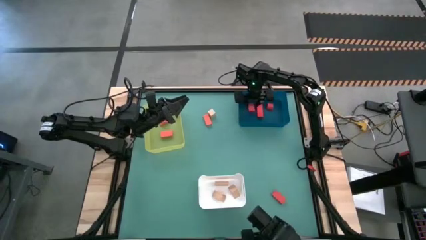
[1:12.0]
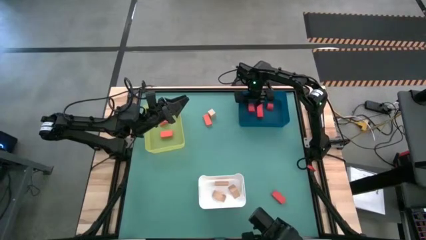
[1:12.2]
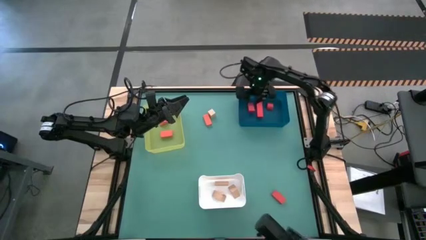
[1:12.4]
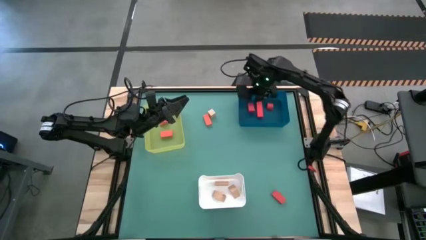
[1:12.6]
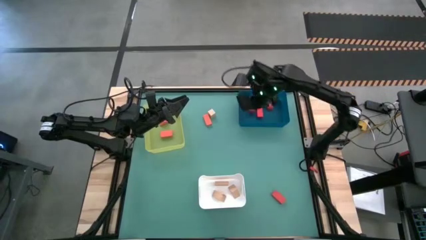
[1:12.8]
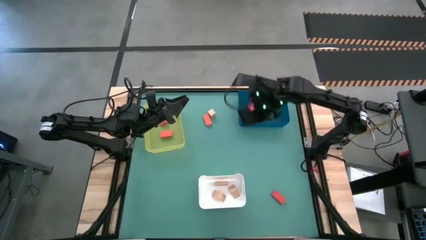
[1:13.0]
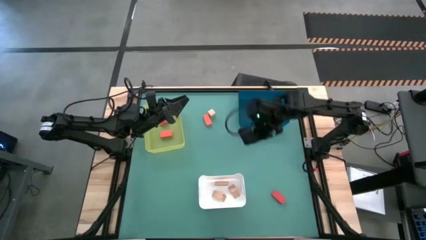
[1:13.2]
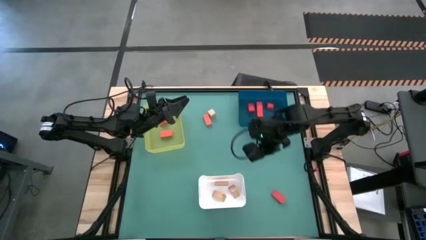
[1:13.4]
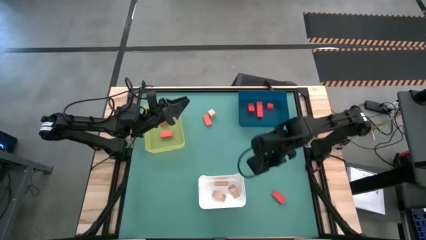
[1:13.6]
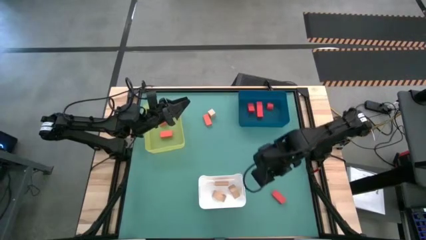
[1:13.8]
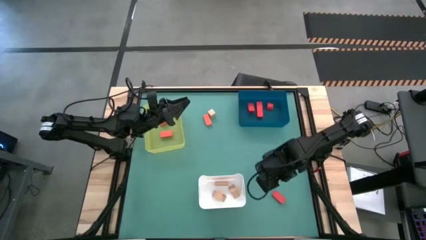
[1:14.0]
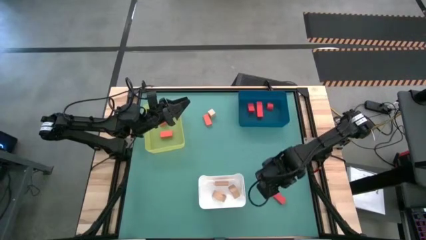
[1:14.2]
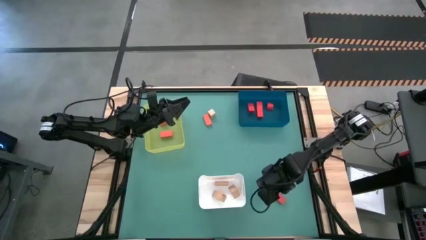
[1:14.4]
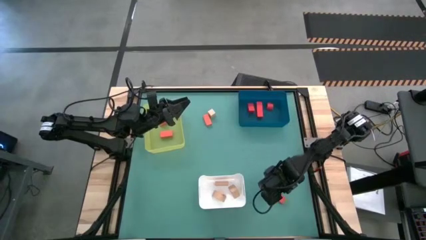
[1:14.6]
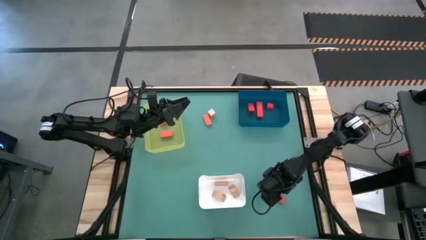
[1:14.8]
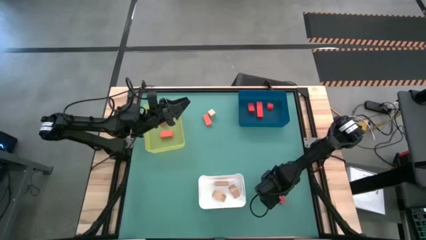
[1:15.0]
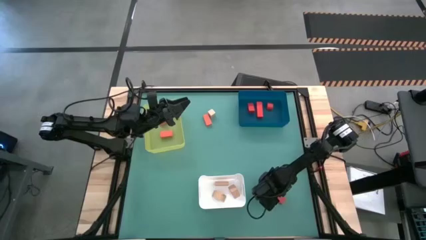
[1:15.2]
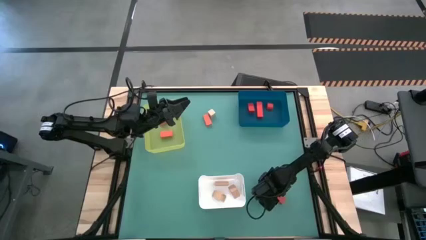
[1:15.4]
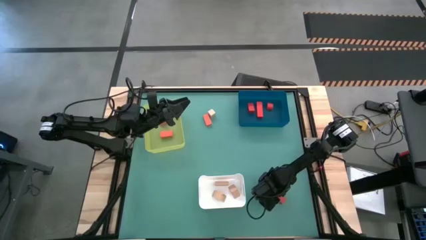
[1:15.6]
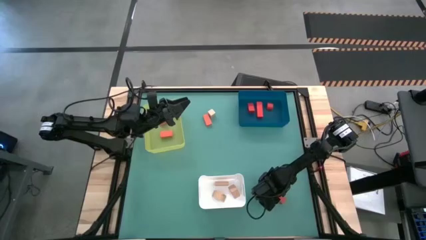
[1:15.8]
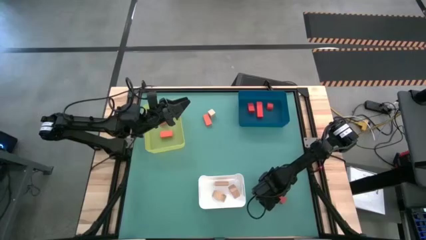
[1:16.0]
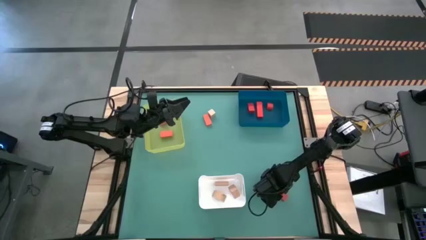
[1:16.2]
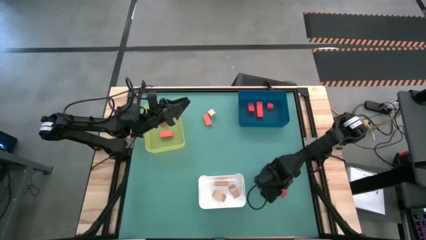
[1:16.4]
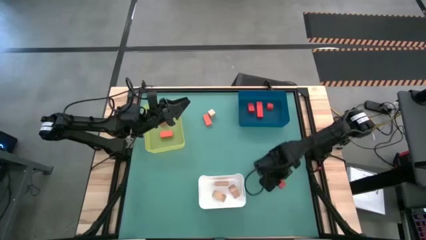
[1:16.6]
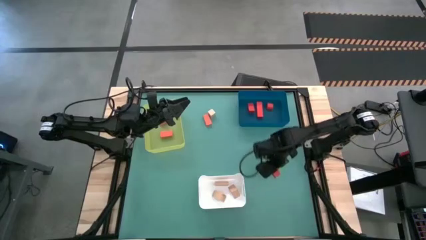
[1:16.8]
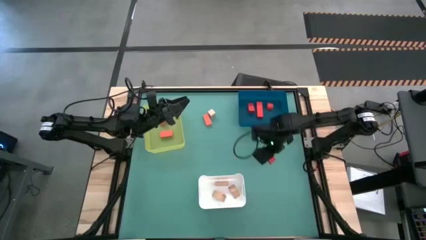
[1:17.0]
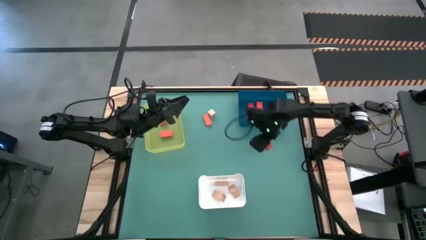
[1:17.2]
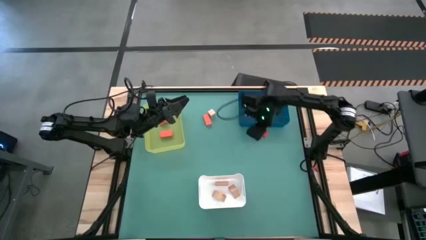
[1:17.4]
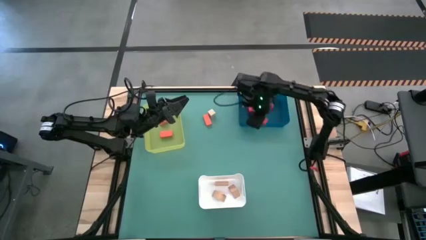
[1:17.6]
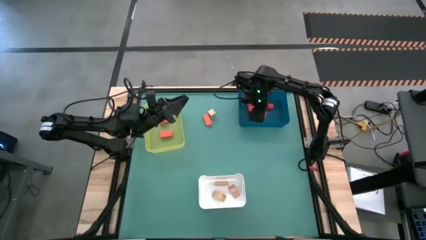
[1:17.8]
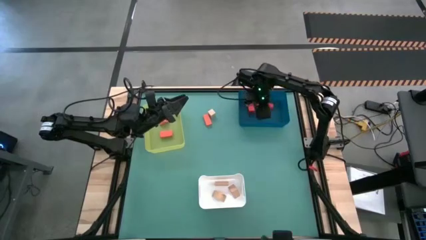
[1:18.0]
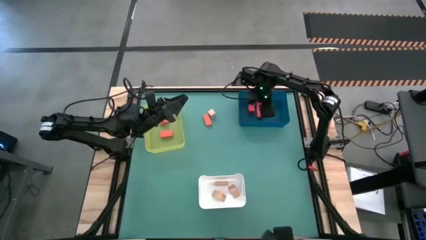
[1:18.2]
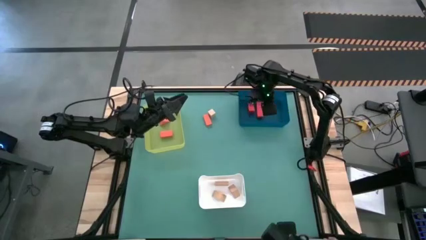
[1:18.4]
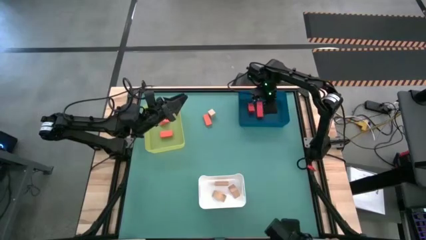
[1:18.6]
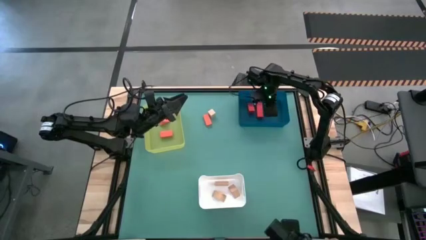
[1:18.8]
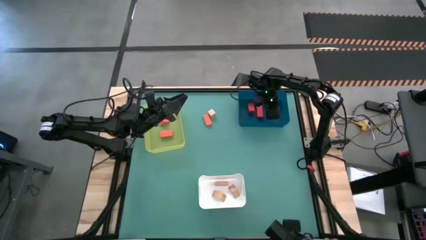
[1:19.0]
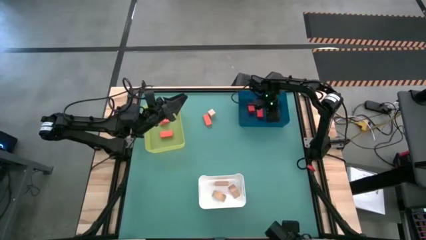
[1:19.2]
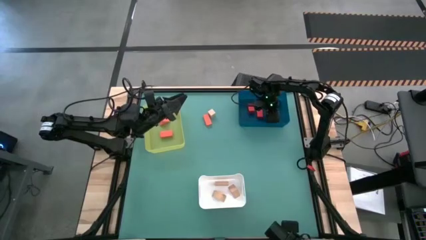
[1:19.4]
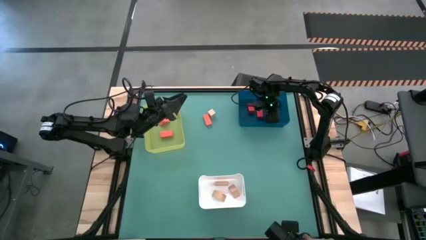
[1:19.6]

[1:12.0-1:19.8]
Task: Sort & place blocks by color
Put the red block into the blue bin

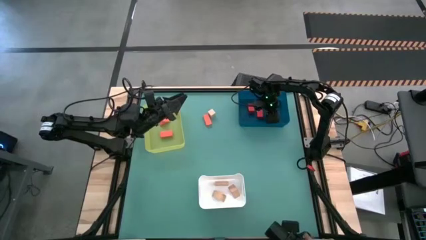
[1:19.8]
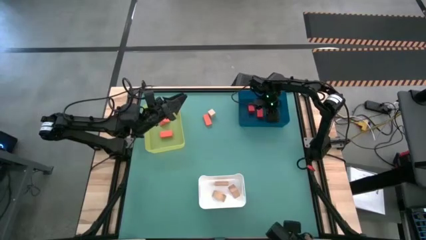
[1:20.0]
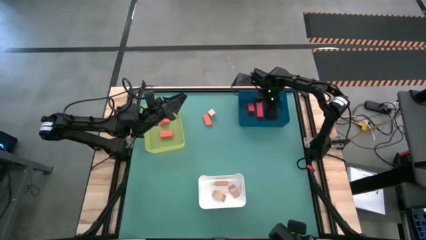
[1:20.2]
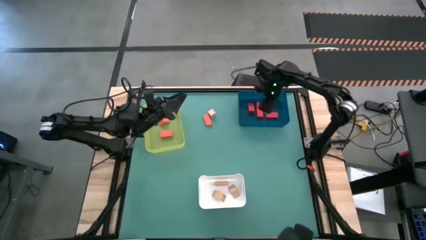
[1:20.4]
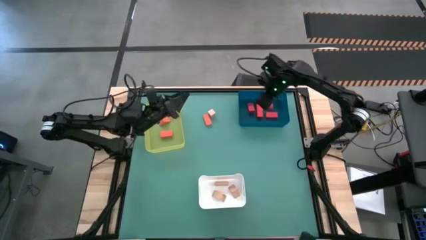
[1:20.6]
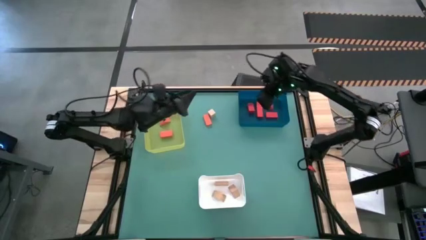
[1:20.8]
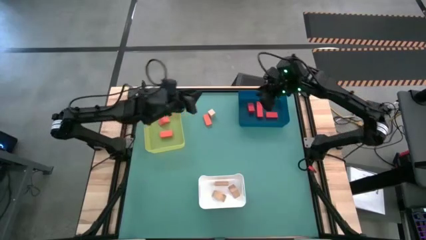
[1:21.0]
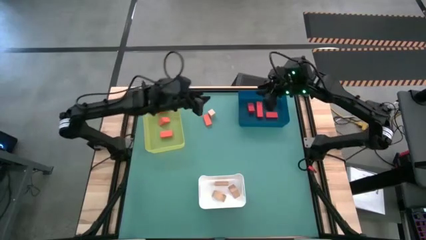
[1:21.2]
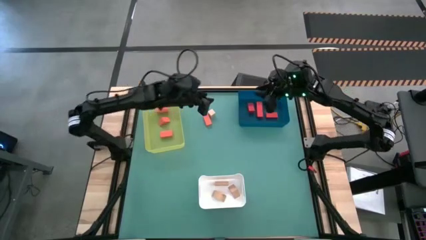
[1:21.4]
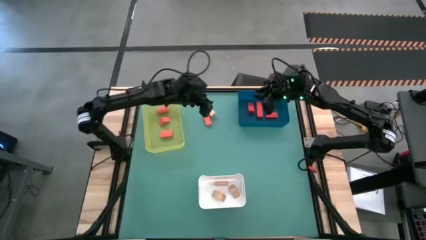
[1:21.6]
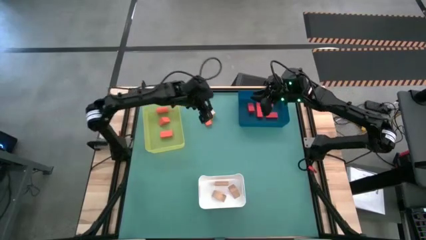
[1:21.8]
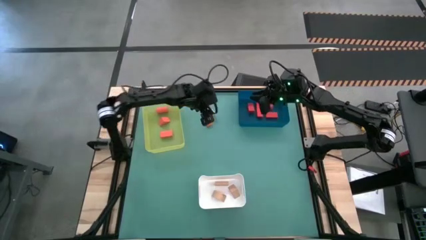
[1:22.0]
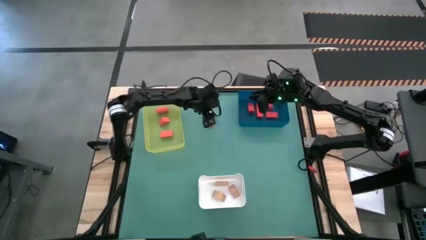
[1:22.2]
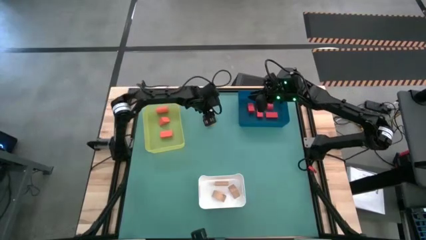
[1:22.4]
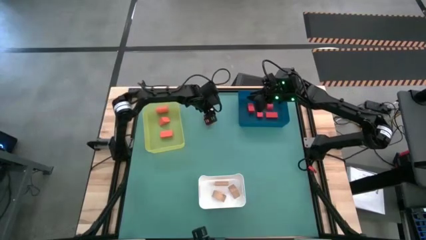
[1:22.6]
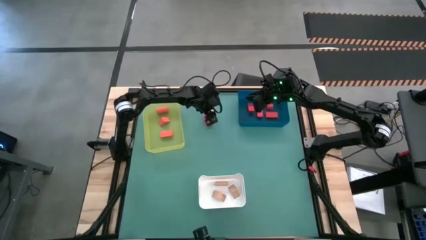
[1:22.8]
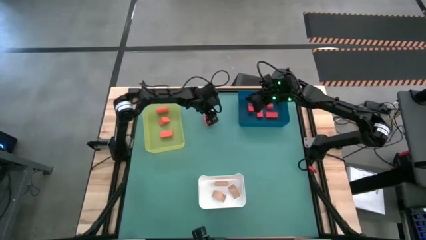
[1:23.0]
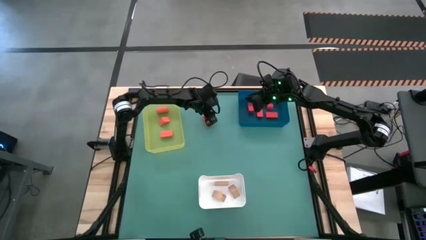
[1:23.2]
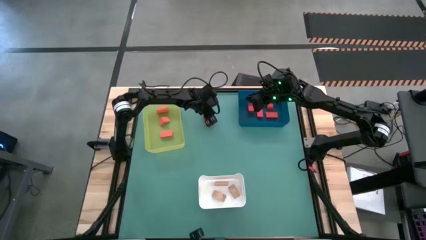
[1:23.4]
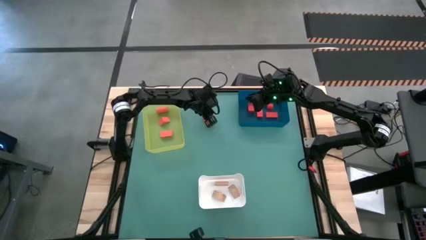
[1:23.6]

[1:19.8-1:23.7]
Put the brown block into the white bin

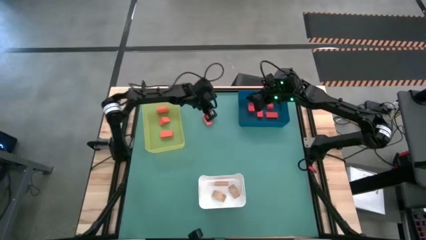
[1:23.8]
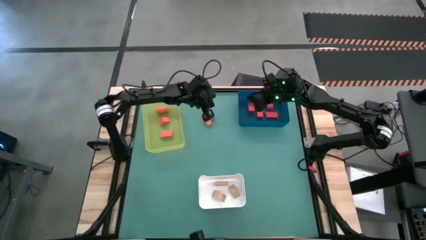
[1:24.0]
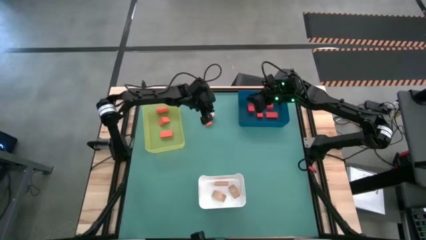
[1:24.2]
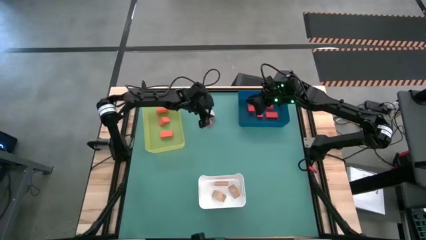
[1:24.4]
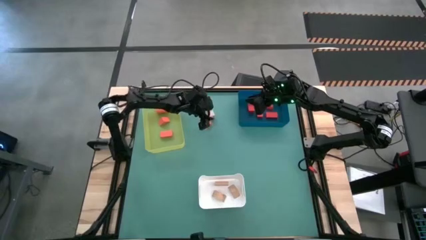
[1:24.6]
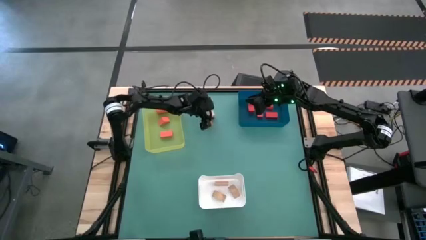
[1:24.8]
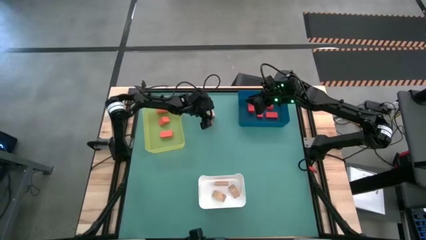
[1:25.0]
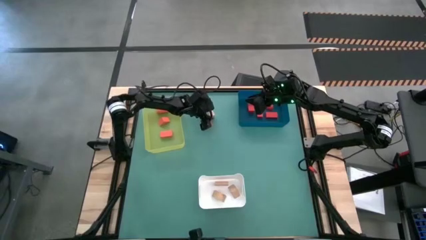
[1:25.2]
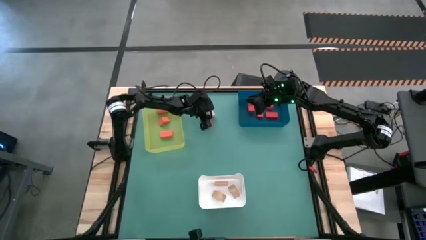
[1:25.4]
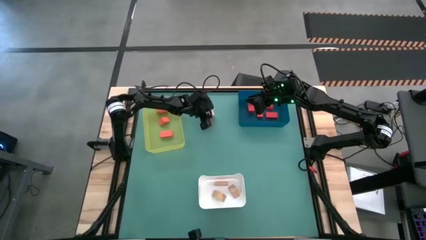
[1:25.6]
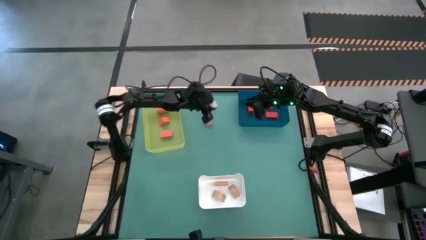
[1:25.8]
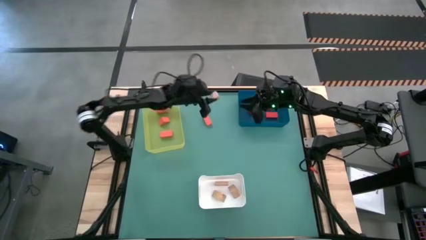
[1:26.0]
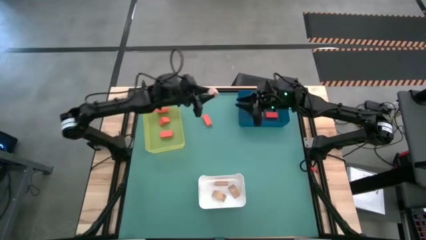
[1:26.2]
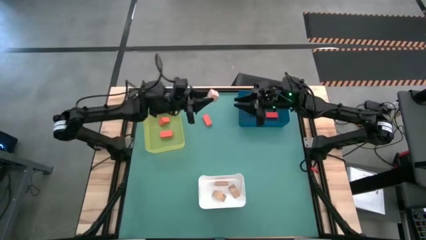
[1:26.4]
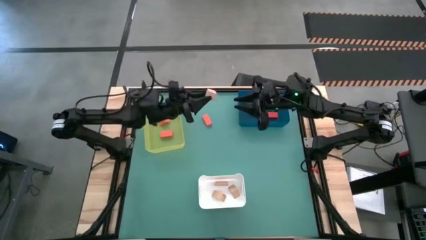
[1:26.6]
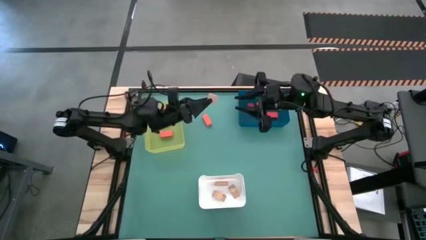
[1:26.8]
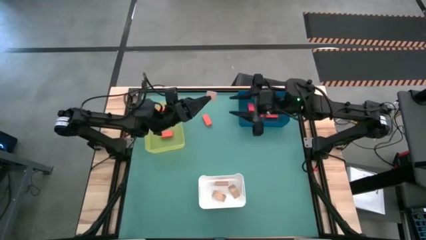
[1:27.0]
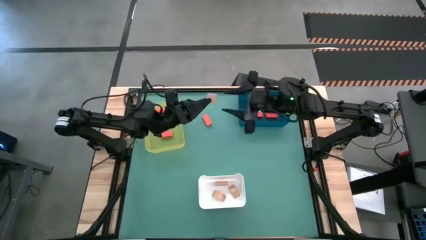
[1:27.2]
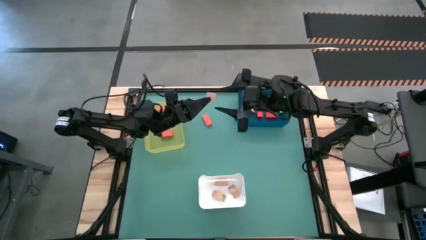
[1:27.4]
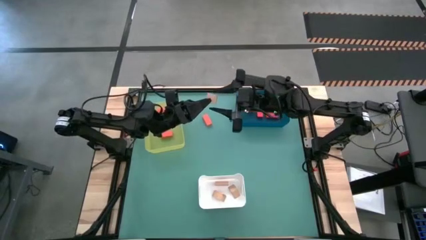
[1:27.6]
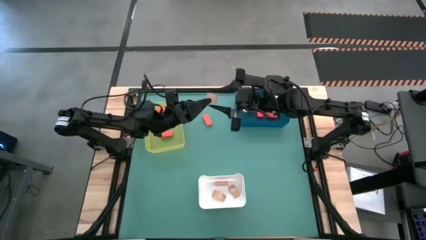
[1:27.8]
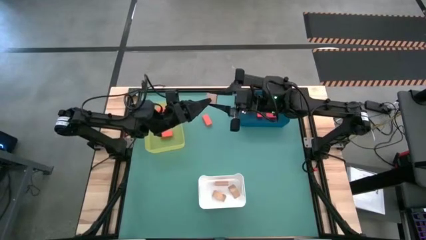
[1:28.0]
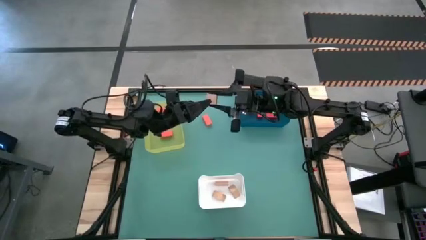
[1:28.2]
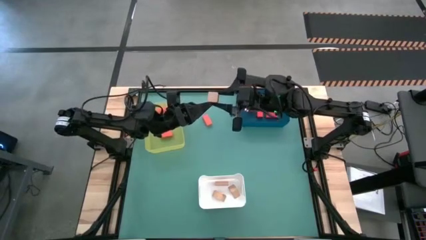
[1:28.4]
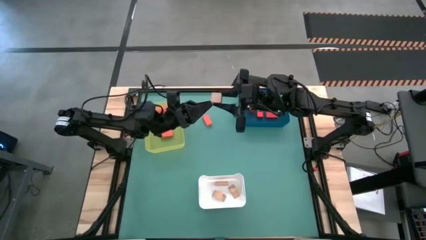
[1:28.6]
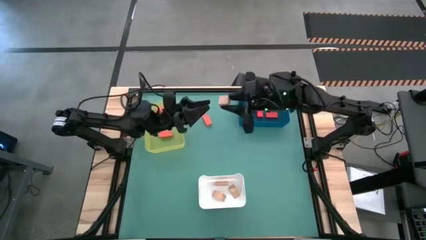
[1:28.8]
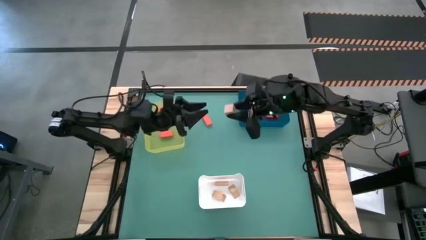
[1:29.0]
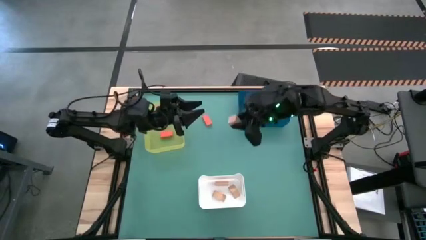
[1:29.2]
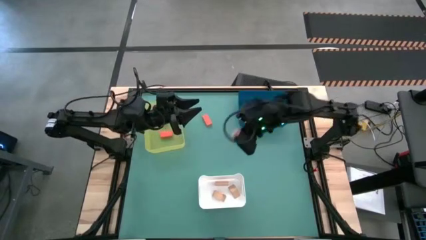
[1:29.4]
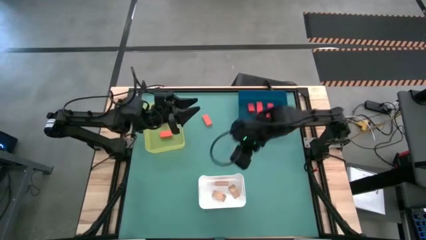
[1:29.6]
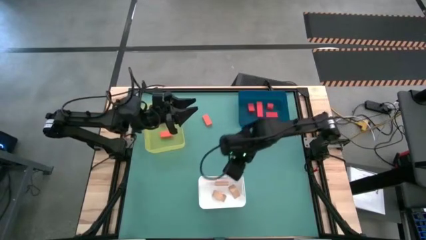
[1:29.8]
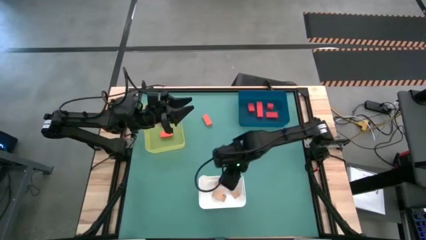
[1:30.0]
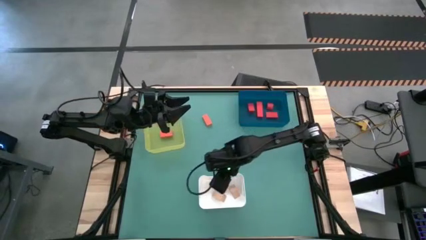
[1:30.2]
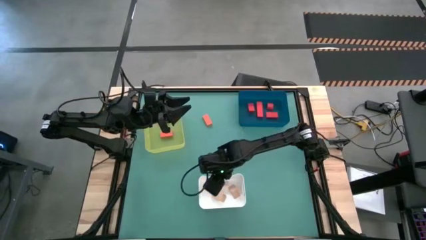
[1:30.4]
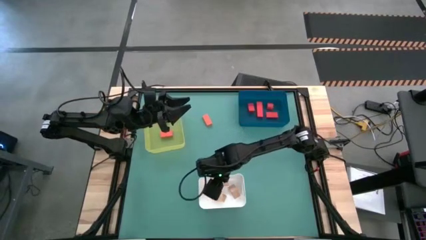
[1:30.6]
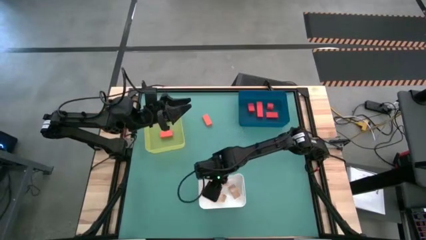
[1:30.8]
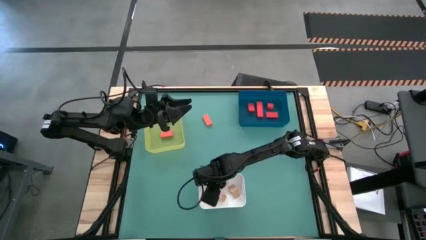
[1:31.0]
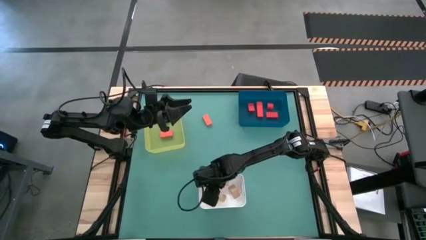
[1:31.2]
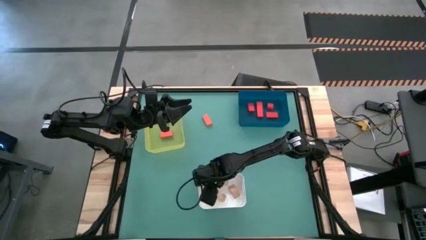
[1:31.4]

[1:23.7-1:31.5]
Put the brown block into the white bin
